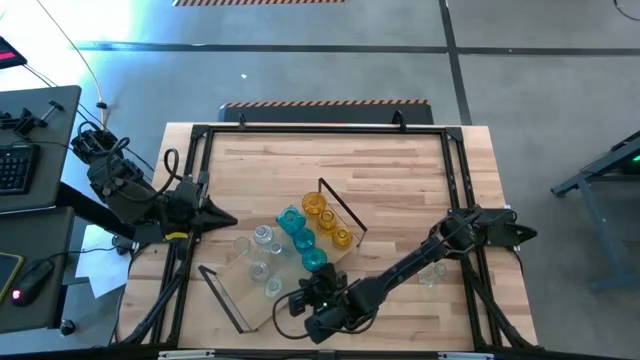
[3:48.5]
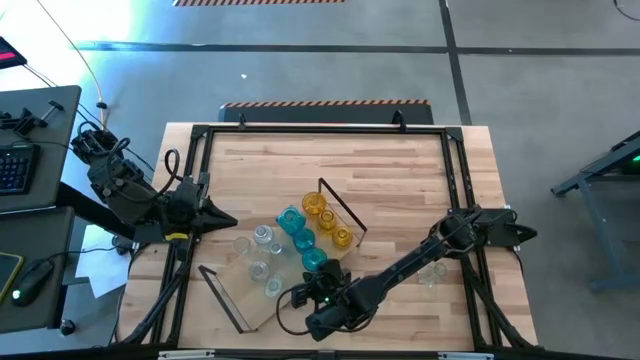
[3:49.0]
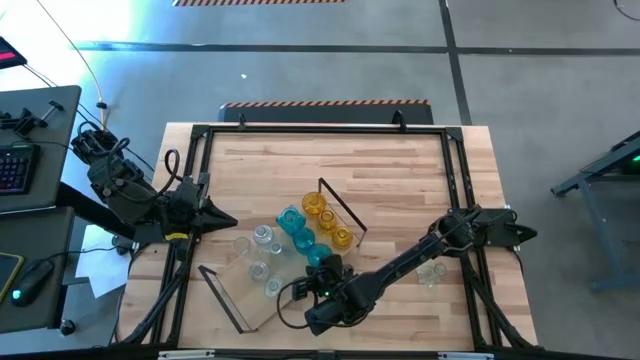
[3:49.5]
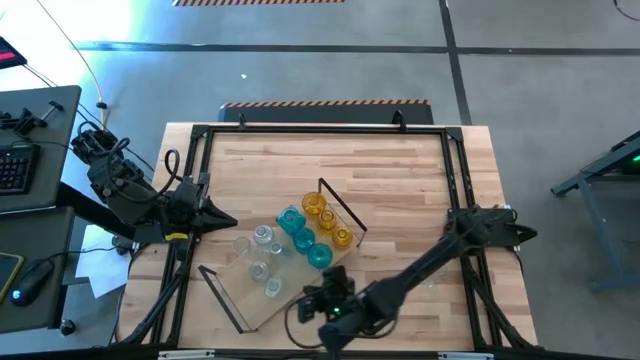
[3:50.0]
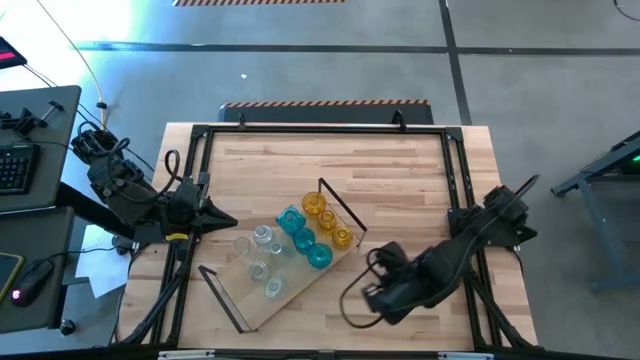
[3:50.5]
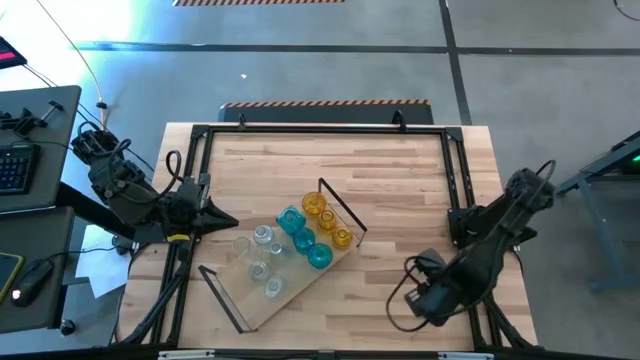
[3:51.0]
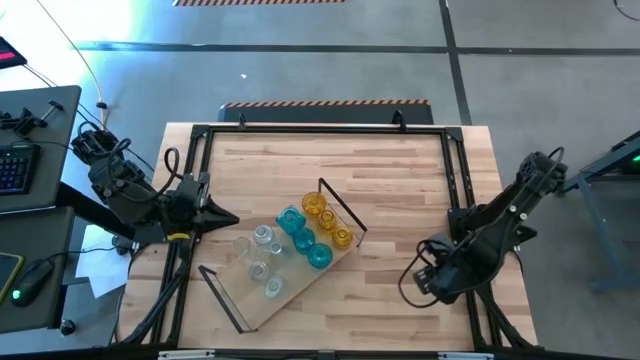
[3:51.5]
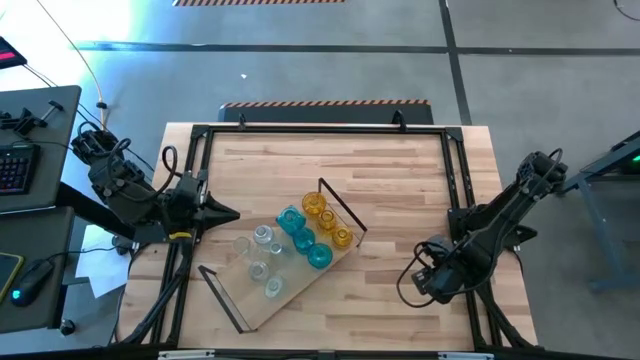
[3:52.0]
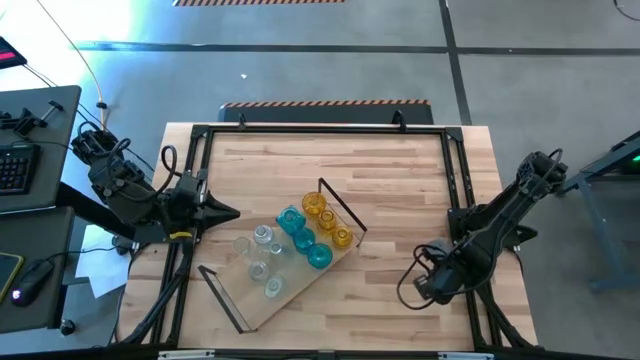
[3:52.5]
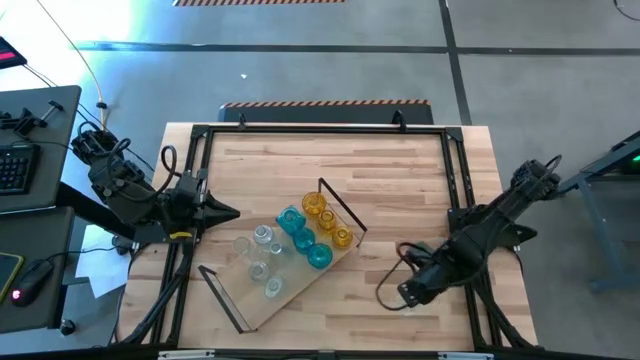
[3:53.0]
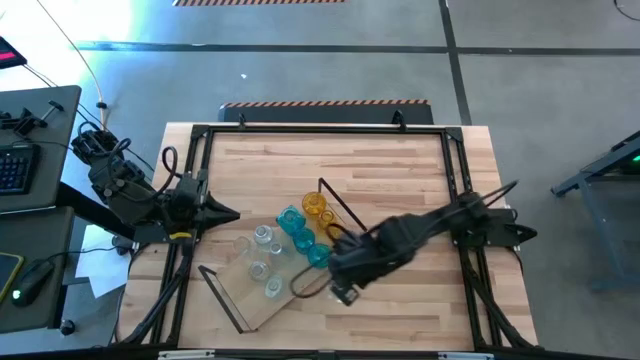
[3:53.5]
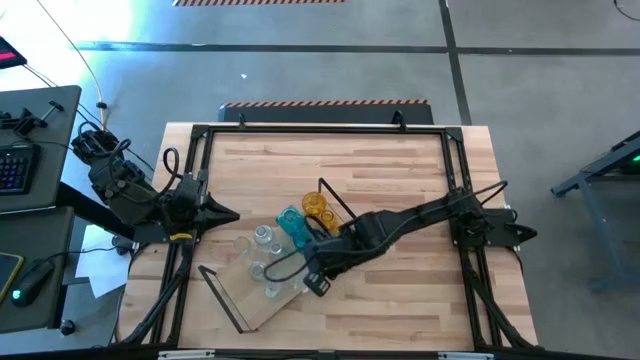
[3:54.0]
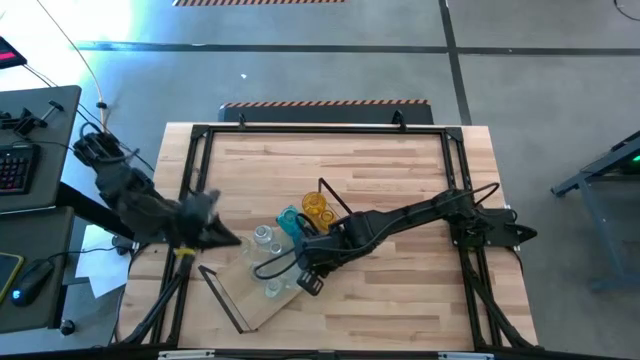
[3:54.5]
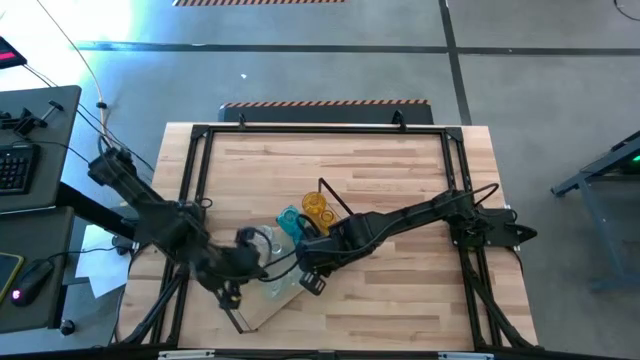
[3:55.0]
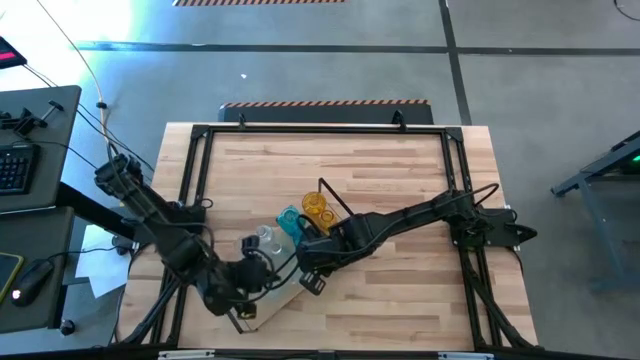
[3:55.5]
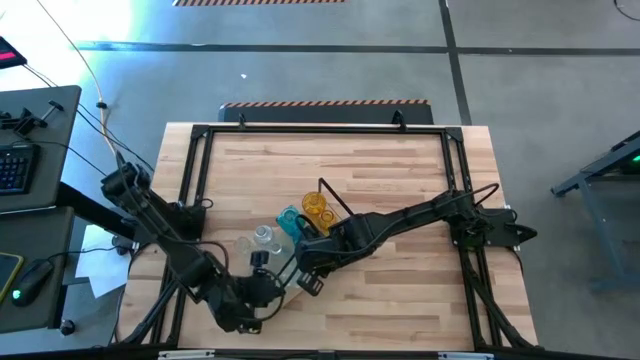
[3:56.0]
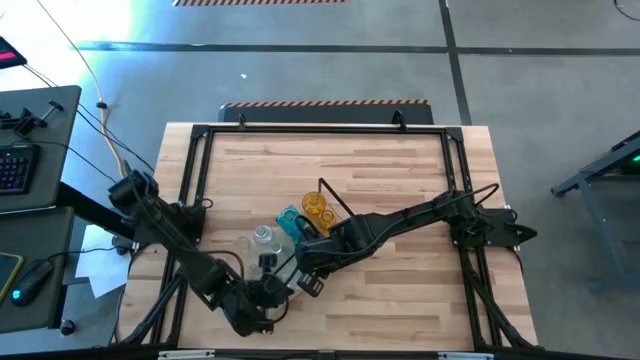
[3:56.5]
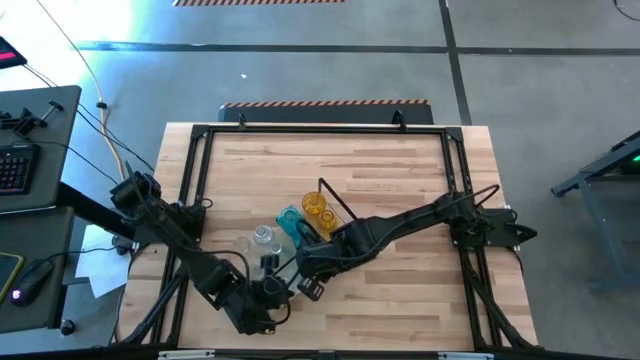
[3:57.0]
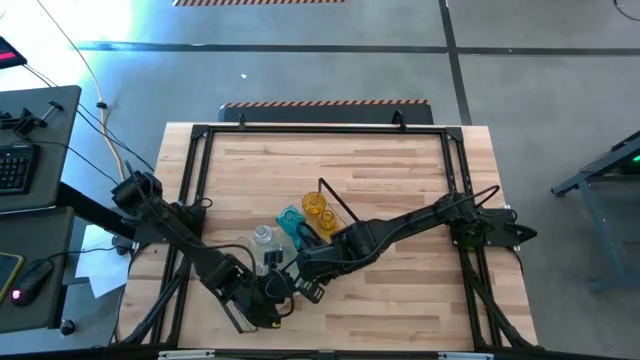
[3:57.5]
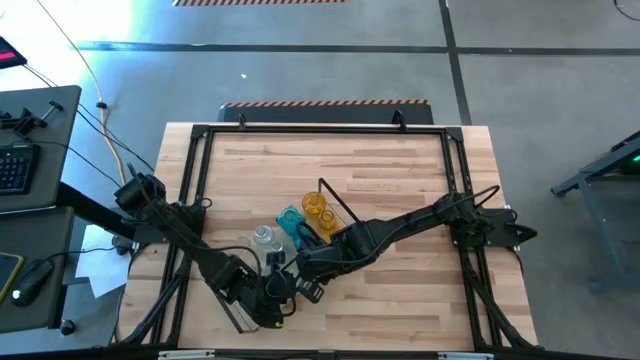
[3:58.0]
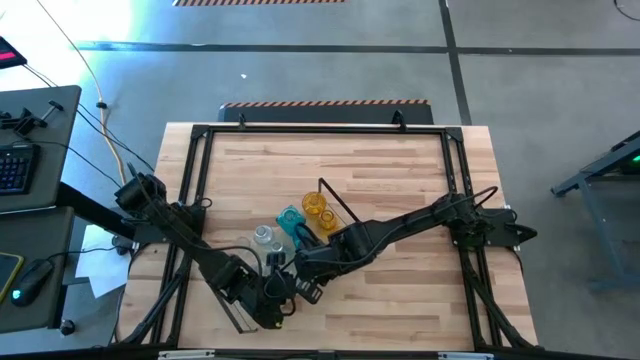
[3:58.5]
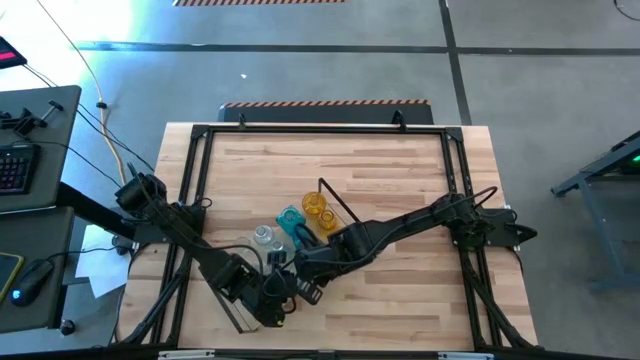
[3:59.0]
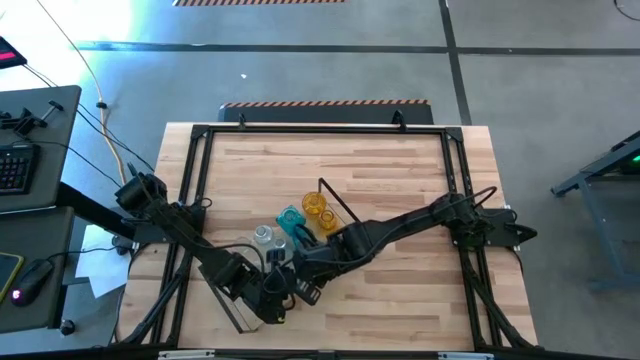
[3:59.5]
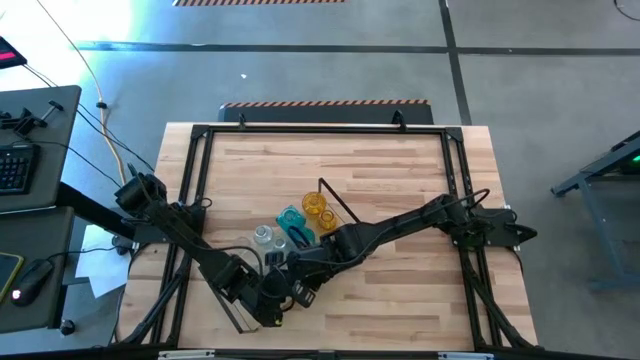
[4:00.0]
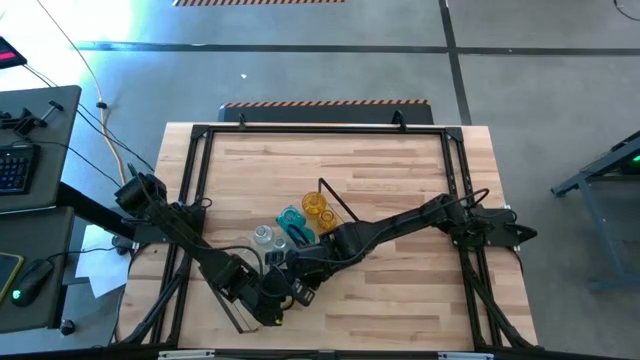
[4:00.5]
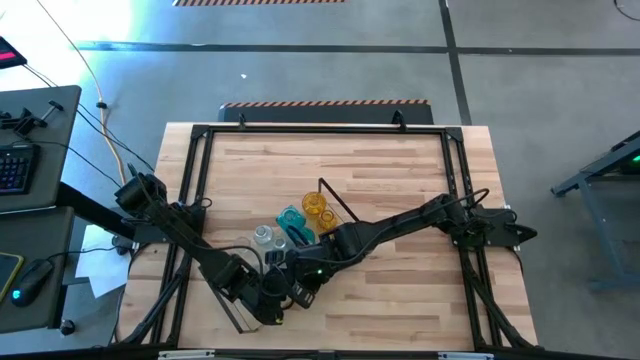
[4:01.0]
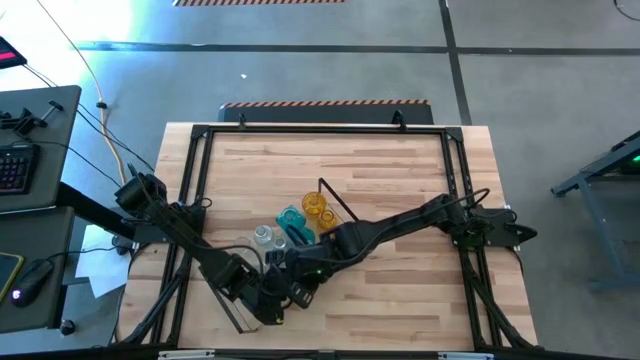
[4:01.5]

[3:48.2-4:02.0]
Task: sort vases onto shelf
Put the transparent vase on the shelf aligned with the other transparent vases

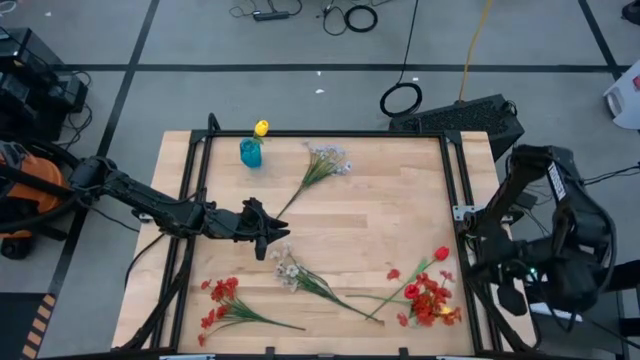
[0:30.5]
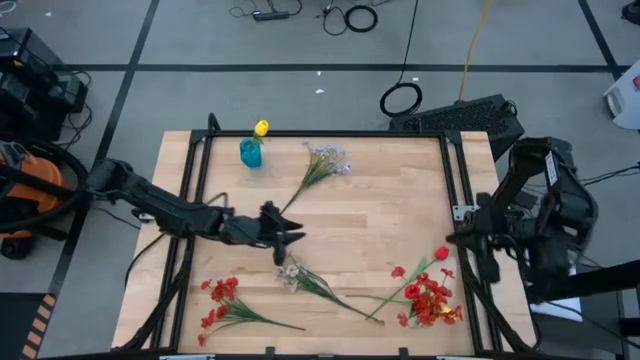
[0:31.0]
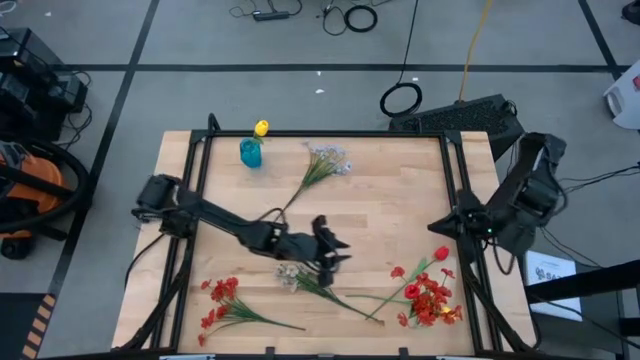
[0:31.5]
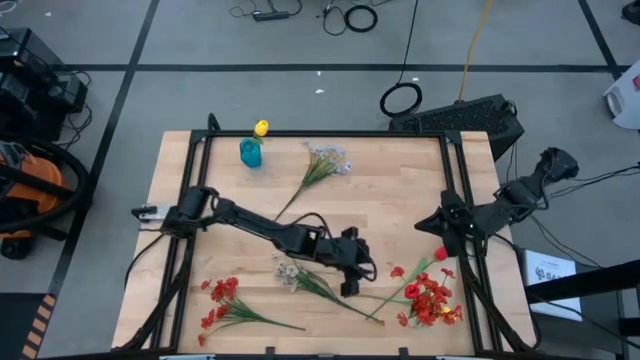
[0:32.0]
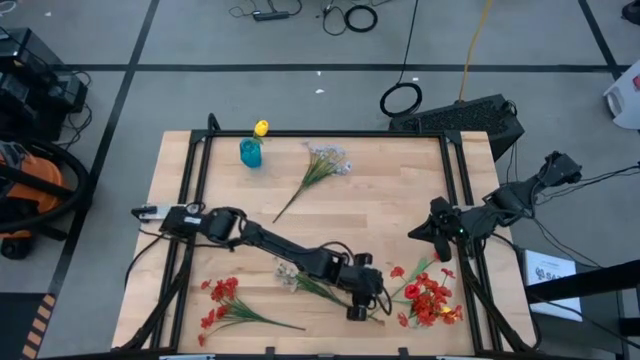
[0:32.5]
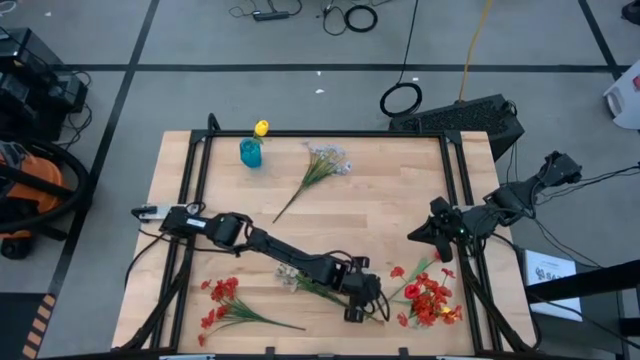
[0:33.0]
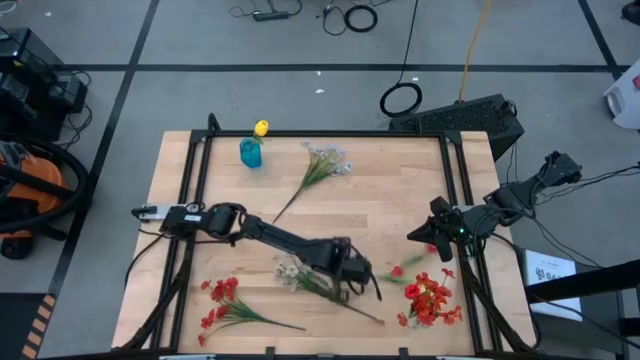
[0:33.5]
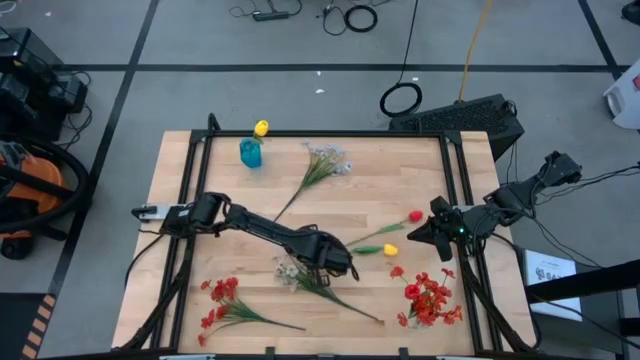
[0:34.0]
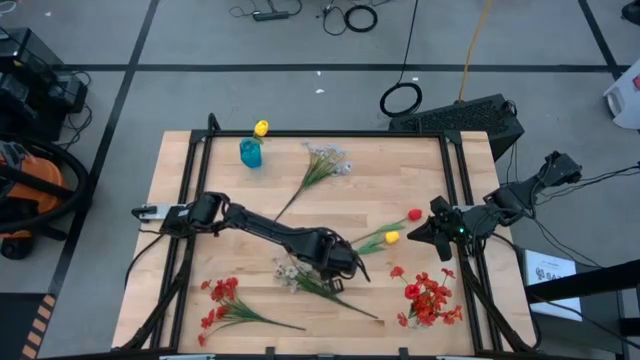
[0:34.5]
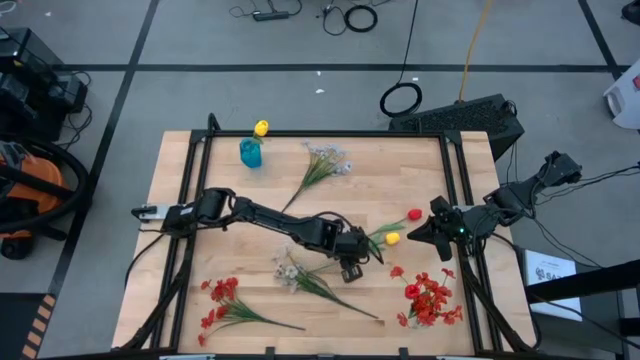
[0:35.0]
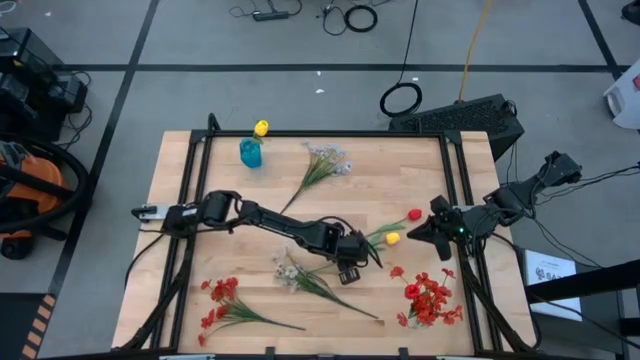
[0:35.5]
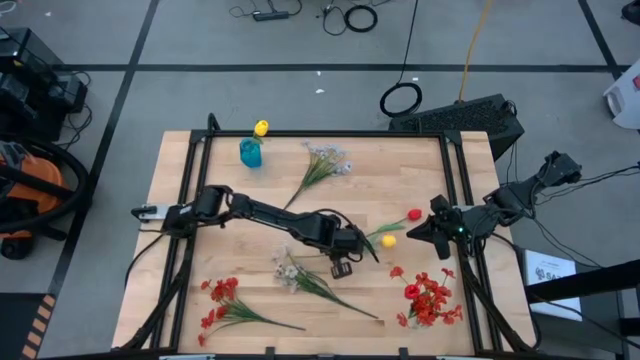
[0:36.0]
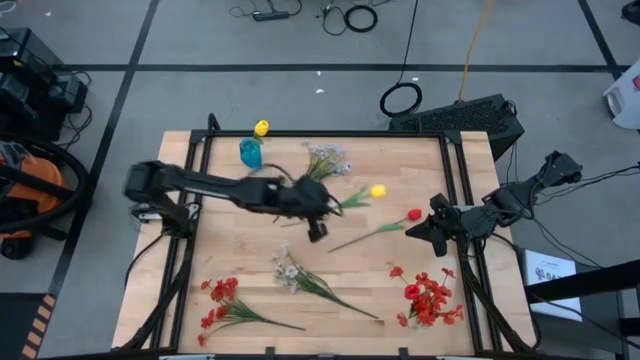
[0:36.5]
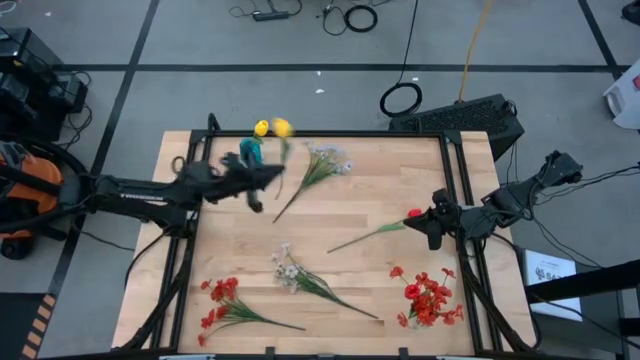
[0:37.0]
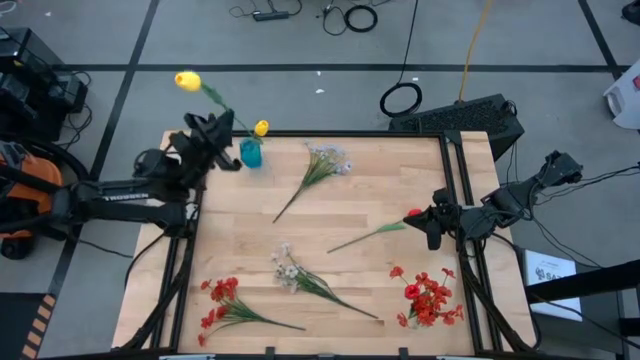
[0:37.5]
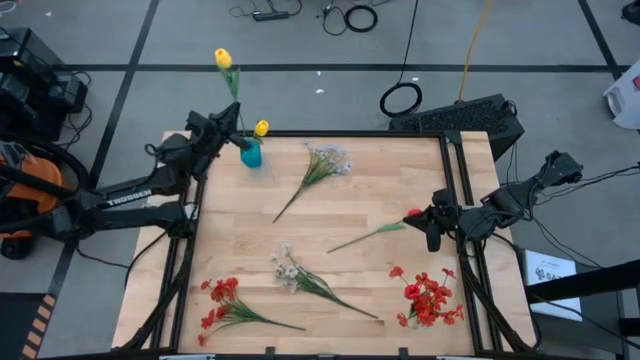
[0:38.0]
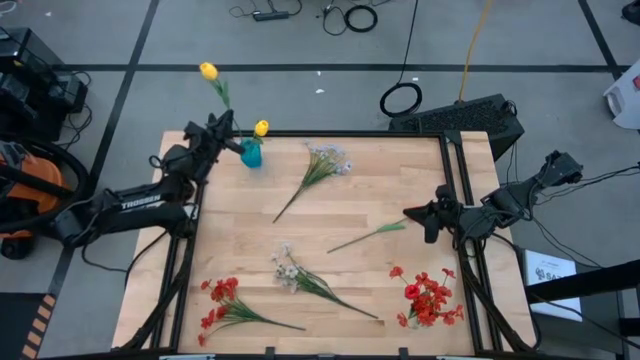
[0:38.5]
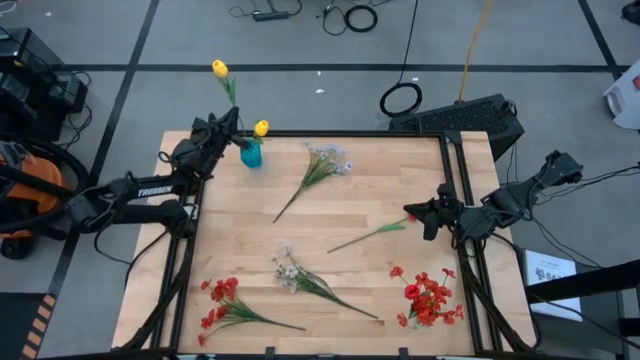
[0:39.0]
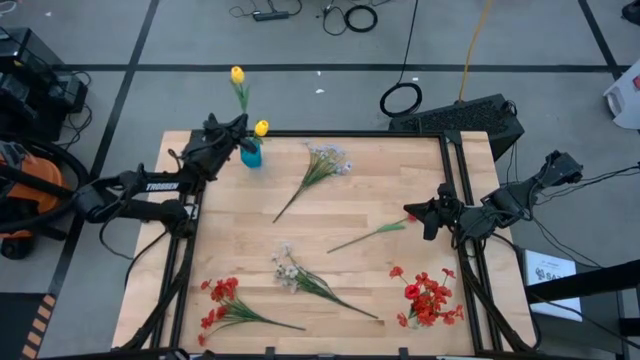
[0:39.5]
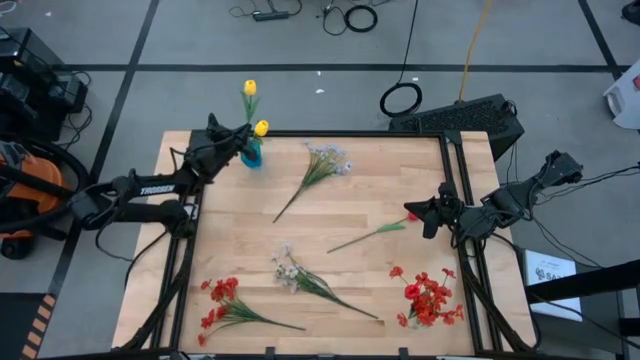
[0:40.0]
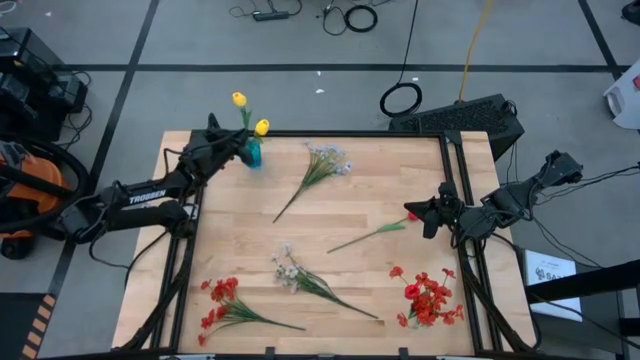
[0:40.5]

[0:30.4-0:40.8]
Task: Sort flowers into vase by color
Put the yellow tulip into the blue vase
